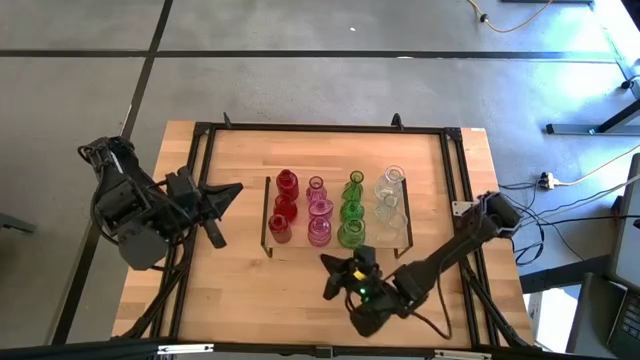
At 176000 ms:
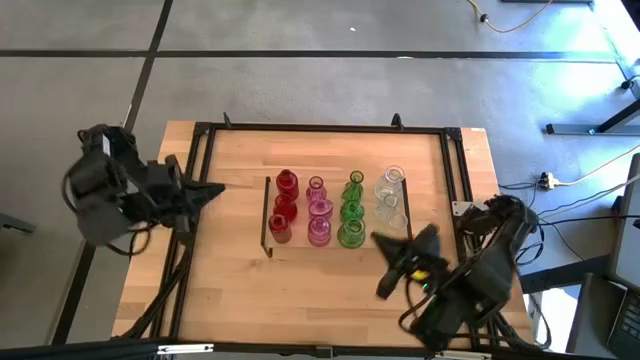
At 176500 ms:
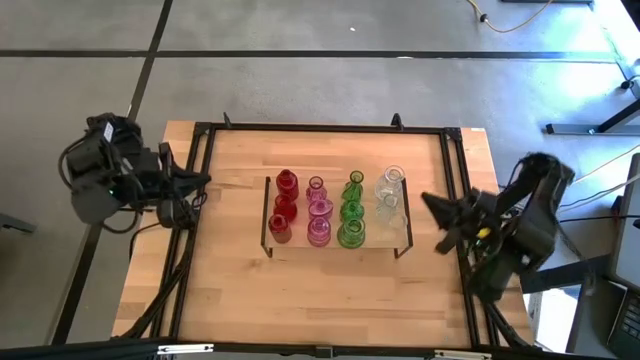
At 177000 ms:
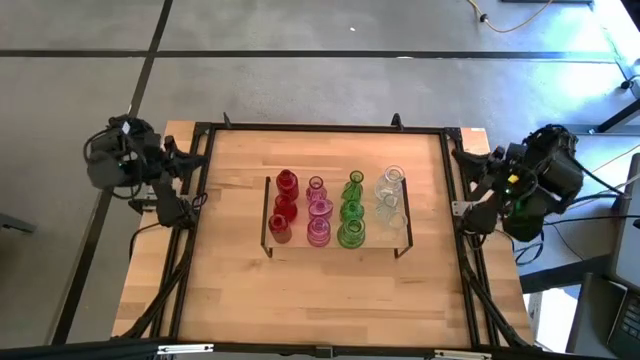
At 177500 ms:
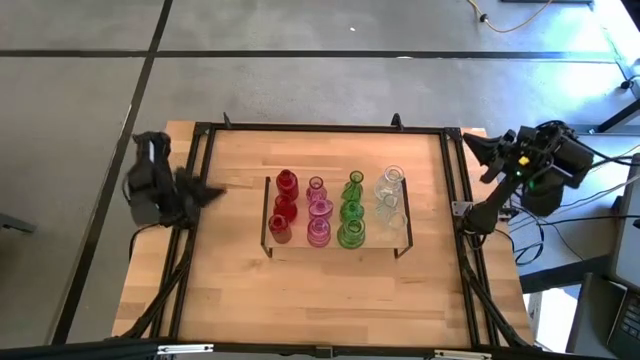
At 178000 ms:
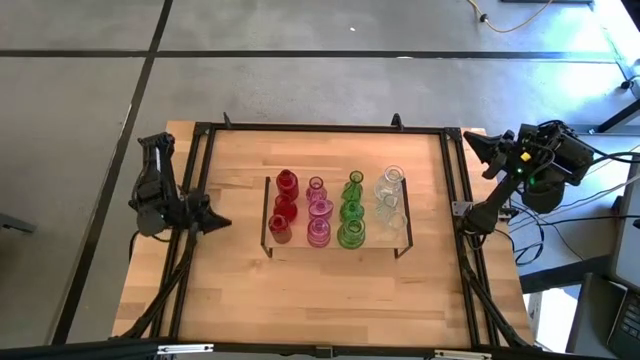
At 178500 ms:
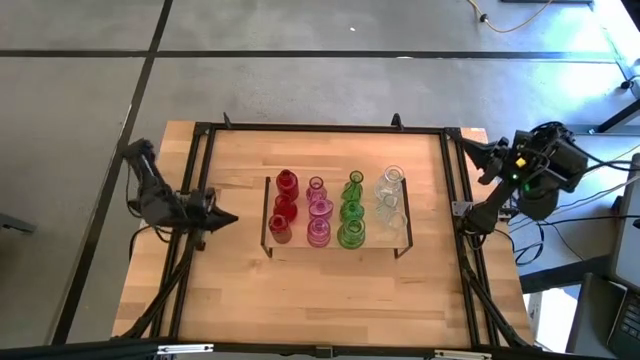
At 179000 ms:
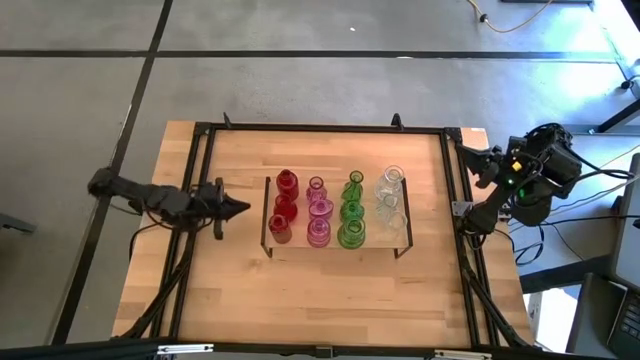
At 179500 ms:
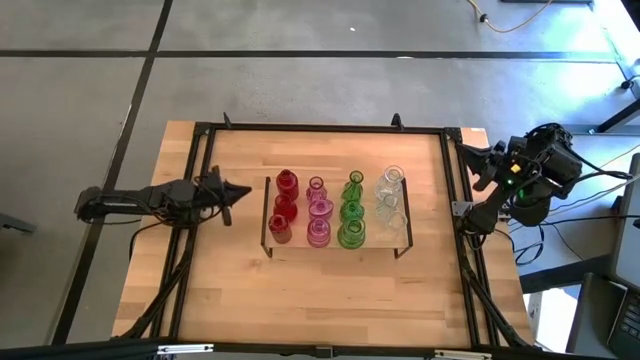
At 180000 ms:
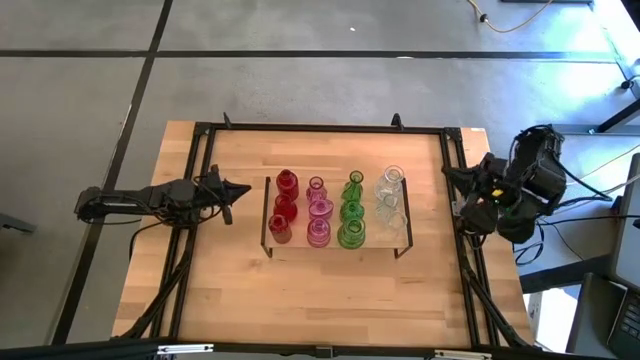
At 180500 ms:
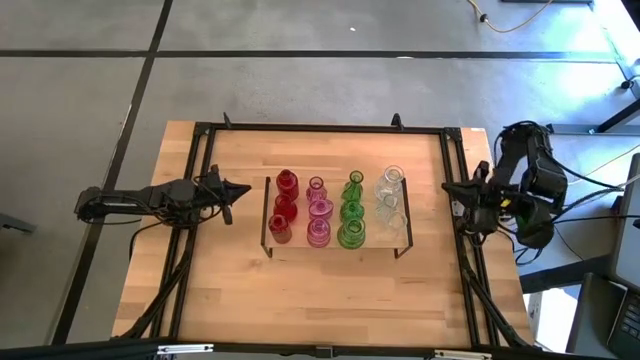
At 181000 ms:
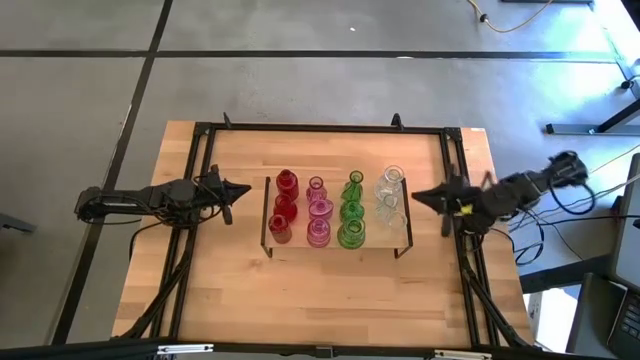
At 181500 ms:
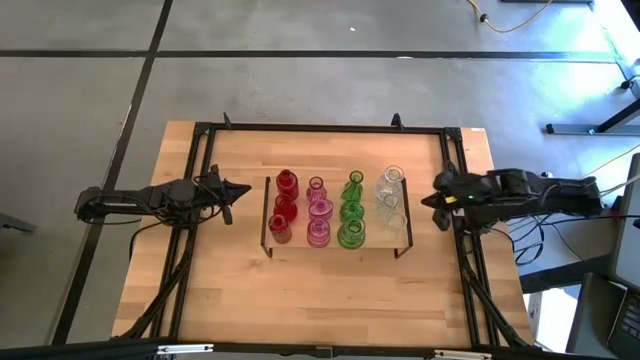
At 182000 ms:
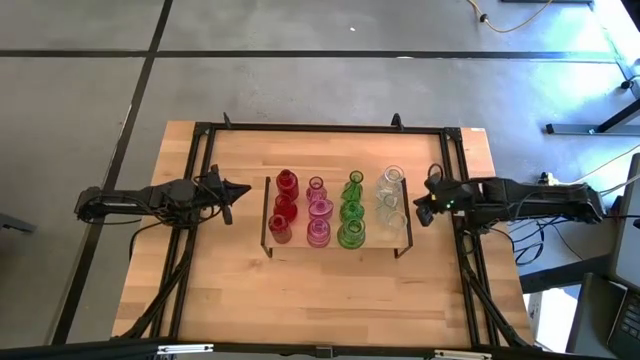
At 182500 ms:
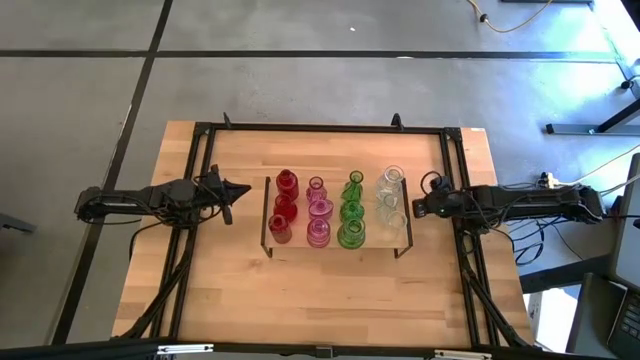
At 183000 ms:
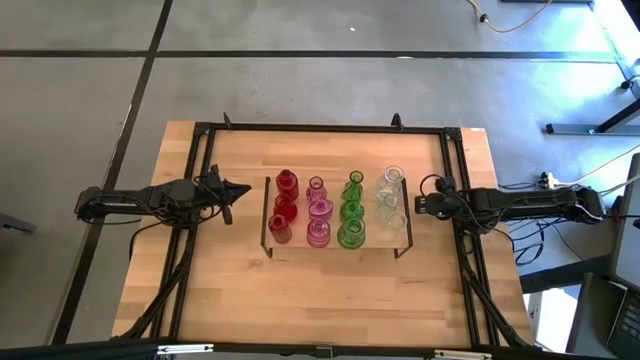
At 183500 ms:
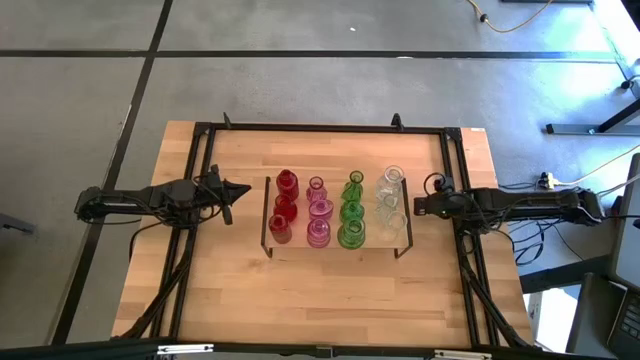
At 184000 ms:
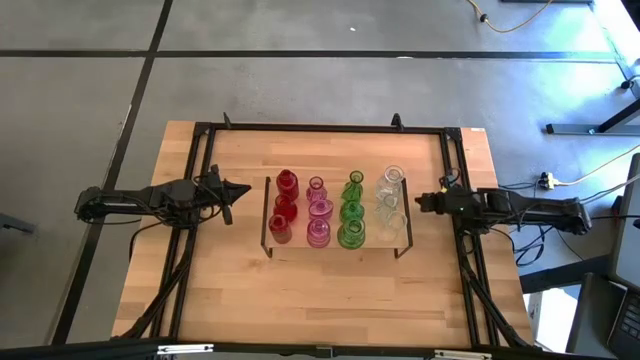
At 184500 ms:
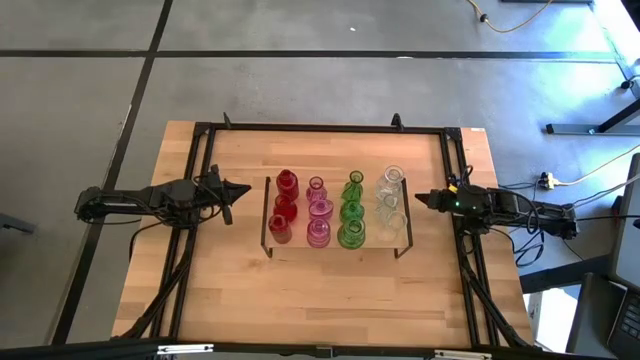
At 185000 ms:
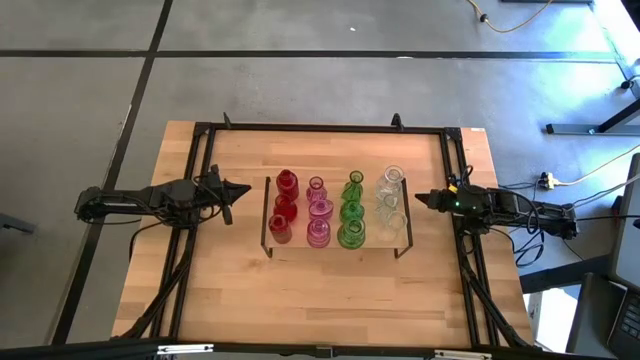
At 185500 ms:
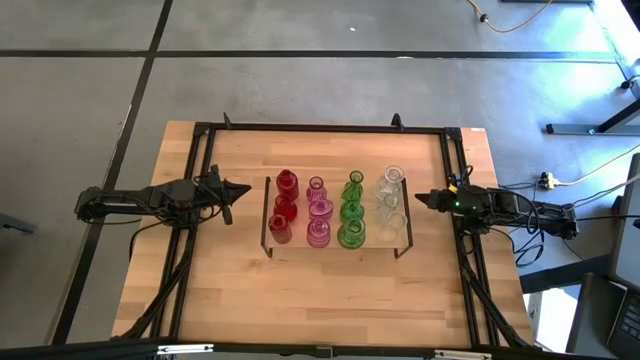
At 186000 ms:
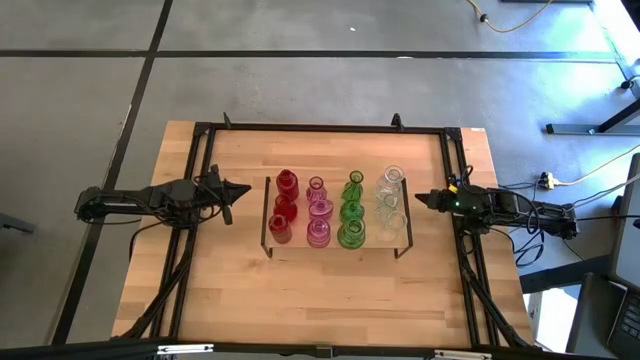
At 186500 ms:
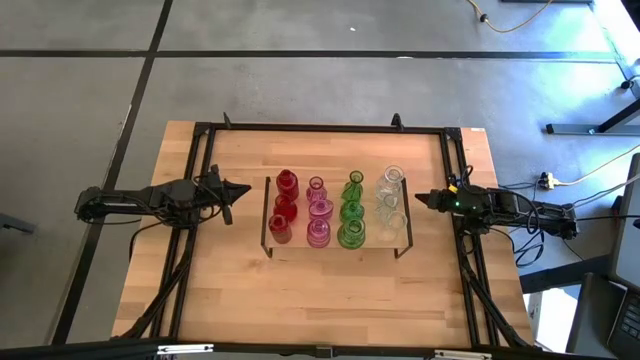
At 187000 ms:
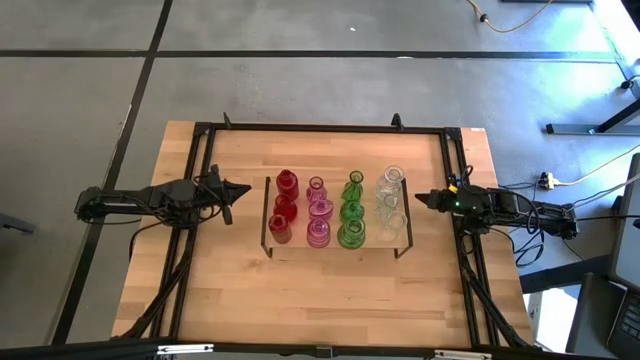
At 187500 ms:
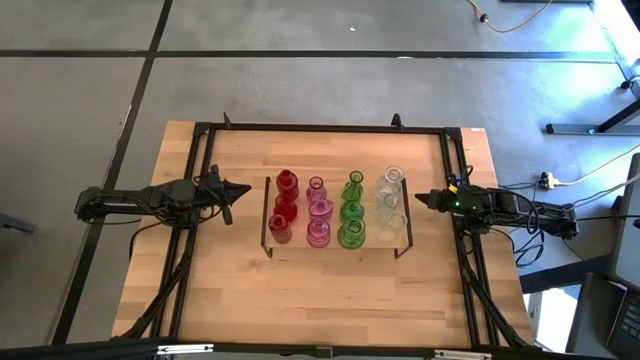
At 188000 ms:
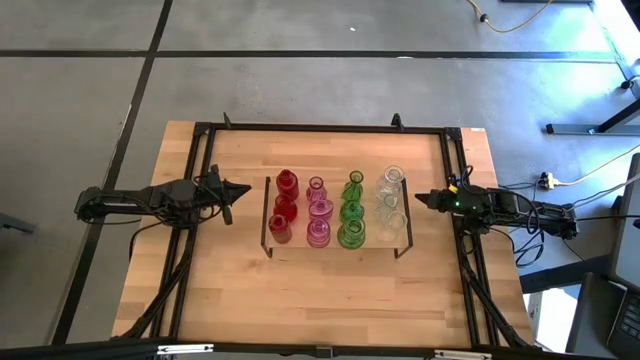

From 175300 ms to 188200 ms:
Task: sort vases onto shelf
Return to Home Position

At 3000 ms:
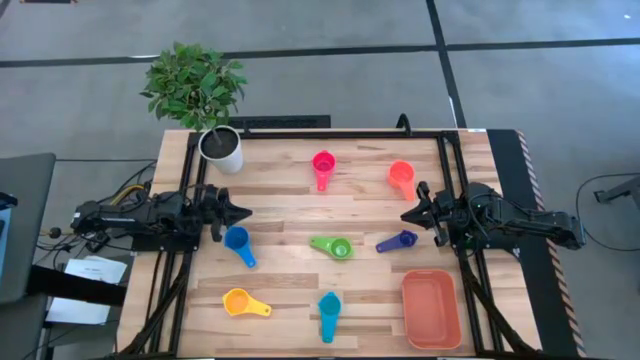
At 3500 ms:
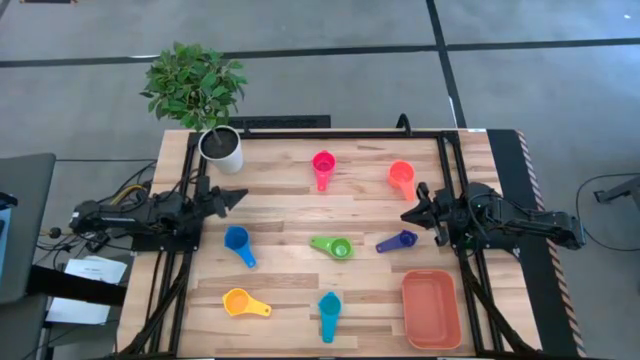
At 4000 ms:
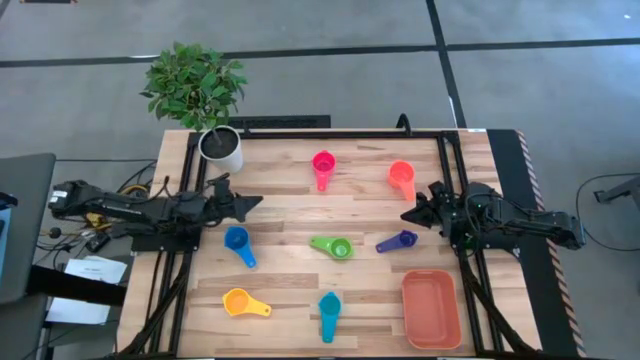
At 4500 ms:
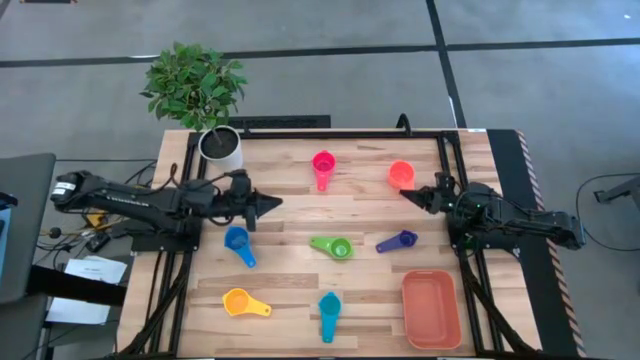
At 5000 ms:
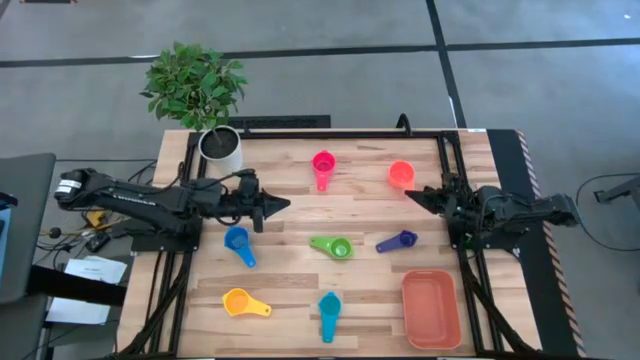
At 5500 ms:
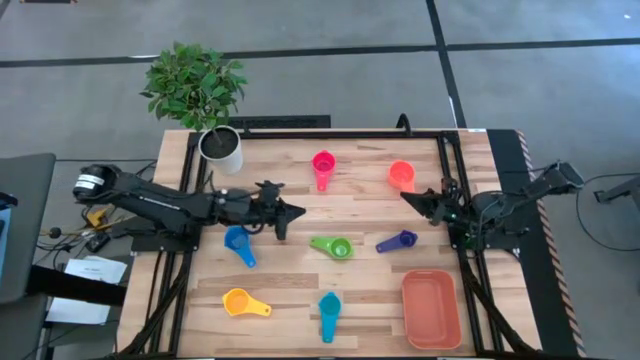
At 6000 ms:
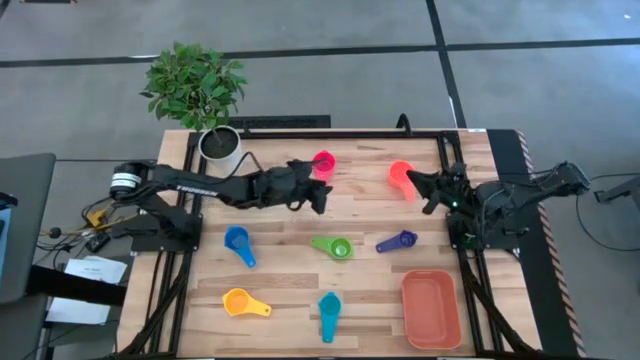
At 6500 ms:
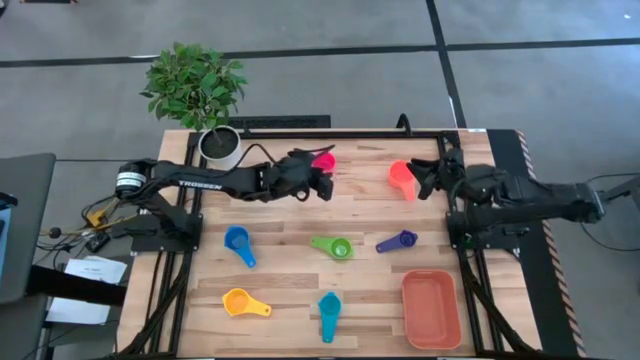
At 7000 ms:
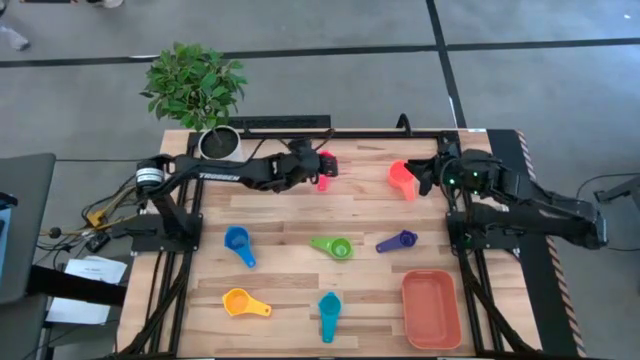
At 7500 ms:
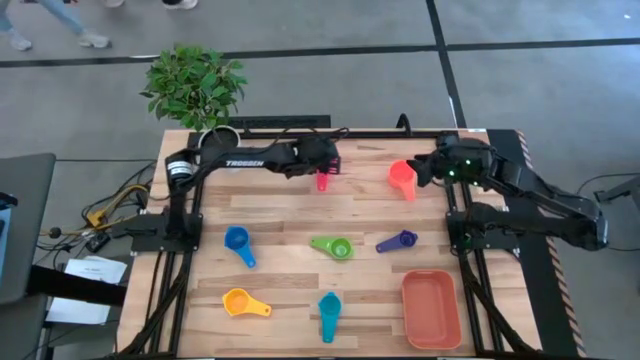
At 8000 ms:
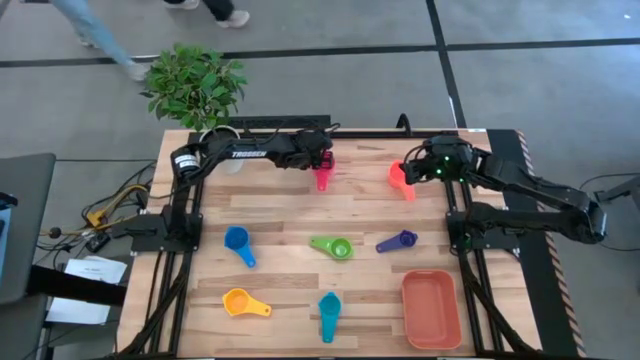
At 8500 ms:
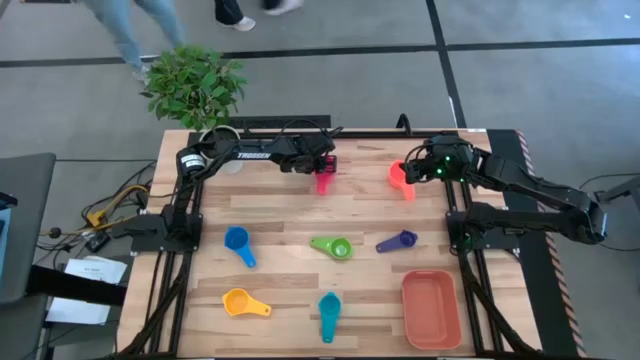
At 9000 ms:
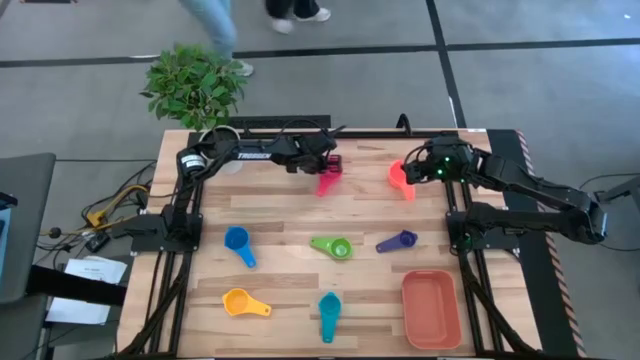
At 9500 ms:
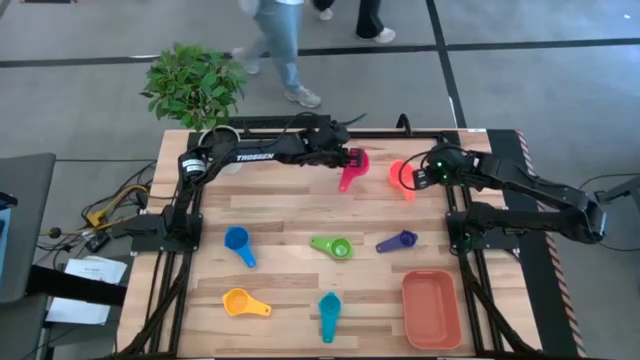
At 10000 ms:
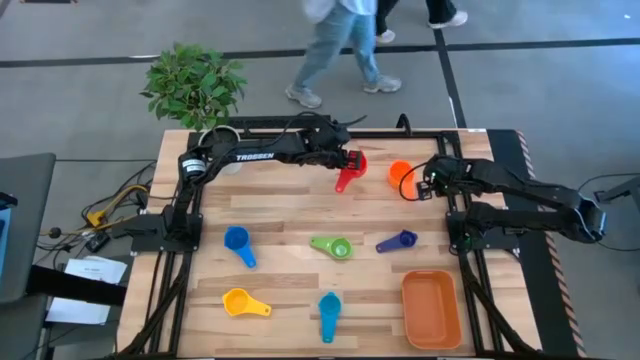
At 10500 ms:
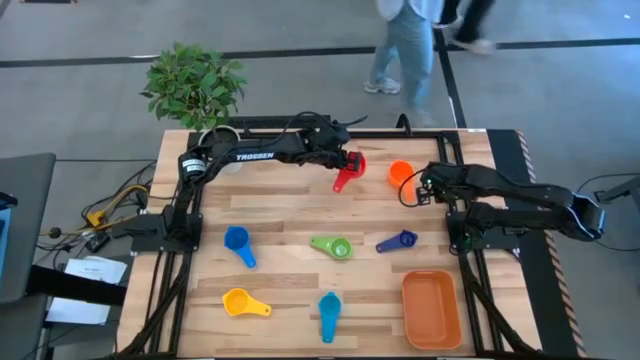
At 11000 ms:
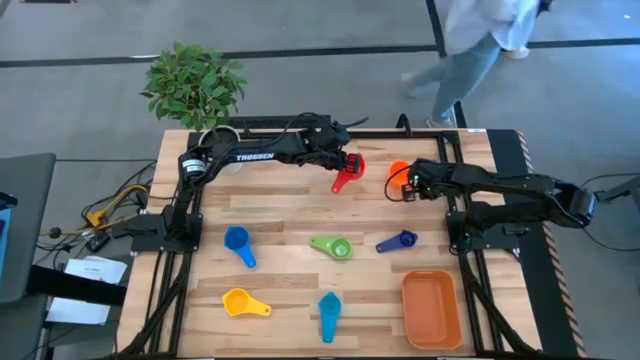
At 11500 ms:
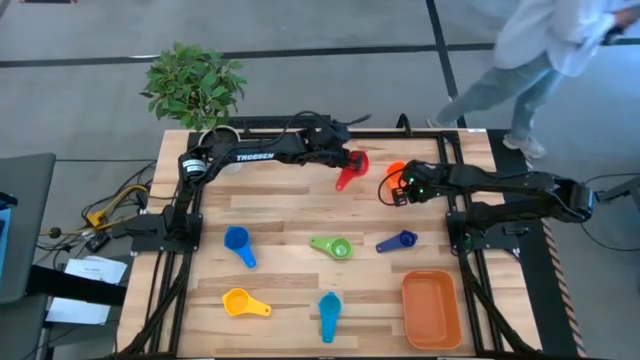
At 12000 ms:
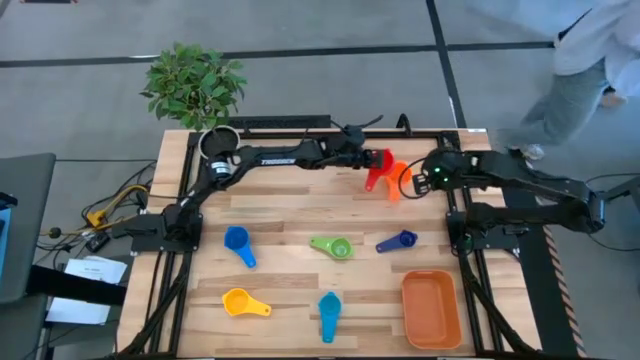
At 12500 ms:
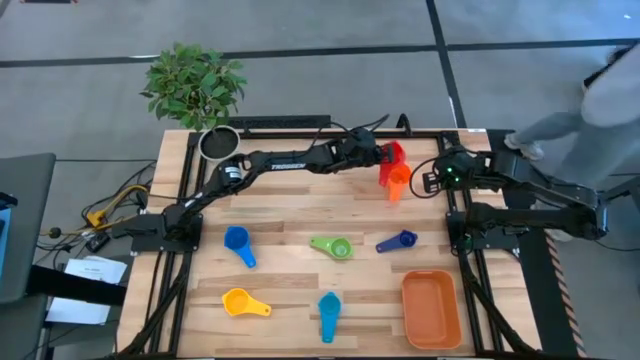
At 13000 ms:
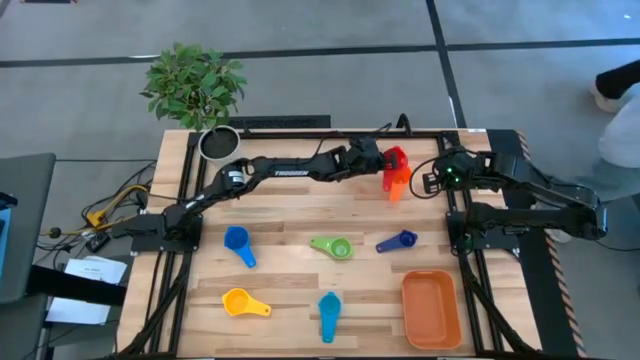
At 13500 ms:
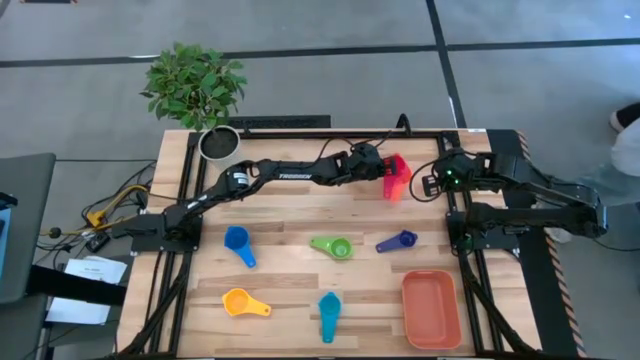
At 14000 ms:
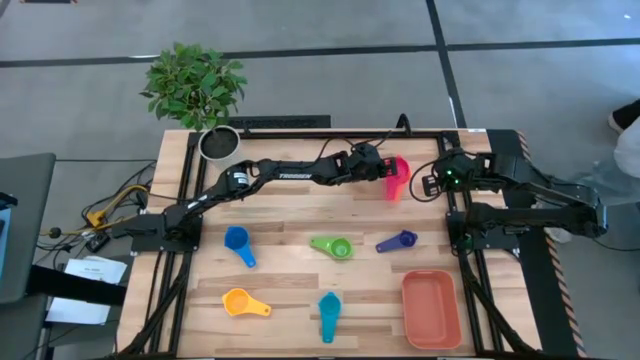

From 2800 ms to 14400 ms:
Task: Nest measuring cups in basket
Stack the red measuring cup on top of the orange measuring cup
